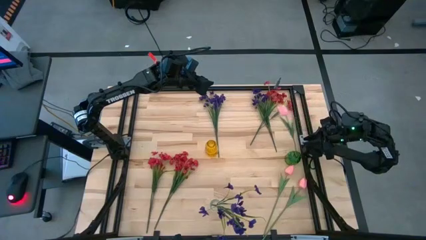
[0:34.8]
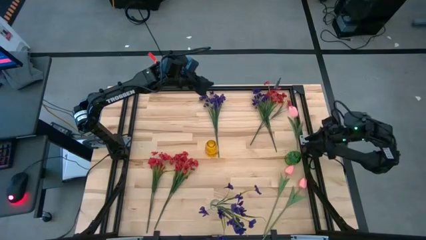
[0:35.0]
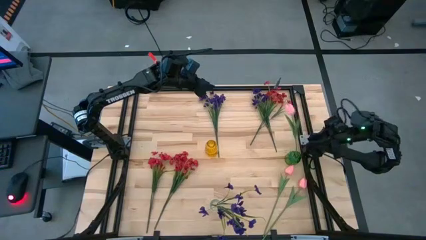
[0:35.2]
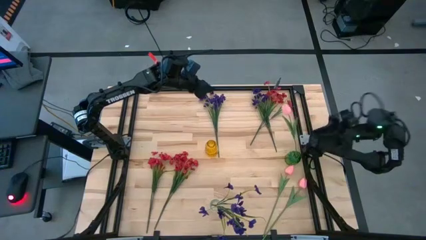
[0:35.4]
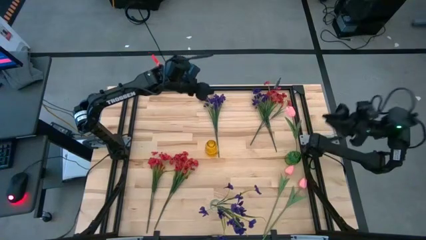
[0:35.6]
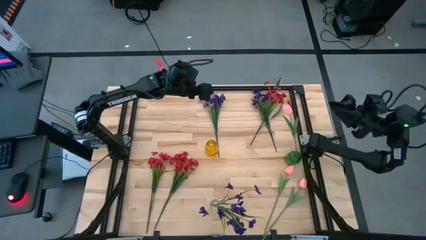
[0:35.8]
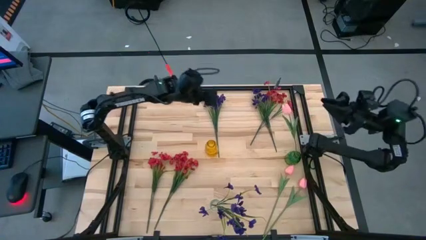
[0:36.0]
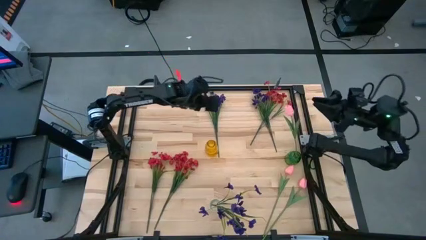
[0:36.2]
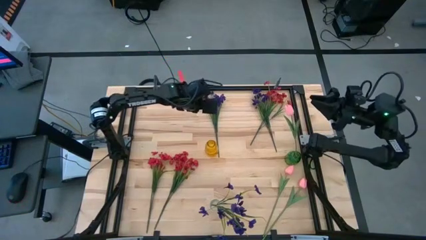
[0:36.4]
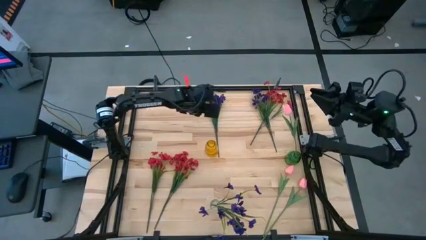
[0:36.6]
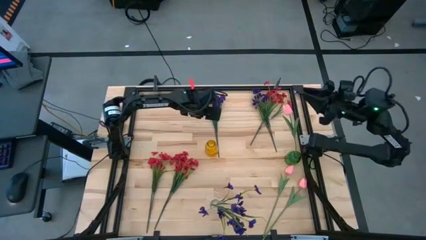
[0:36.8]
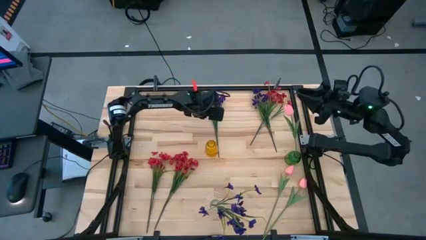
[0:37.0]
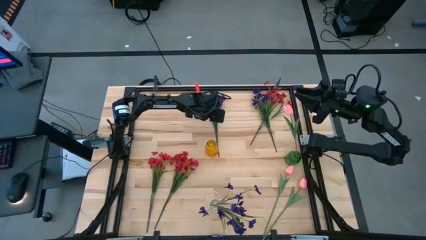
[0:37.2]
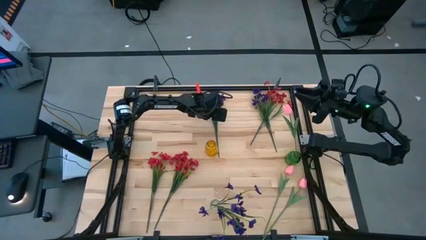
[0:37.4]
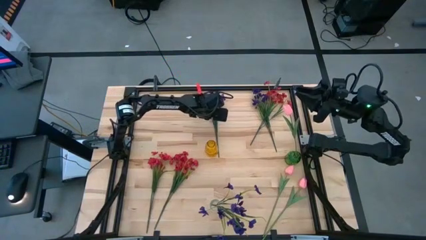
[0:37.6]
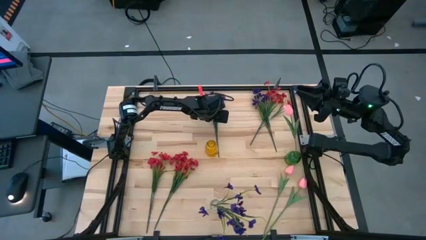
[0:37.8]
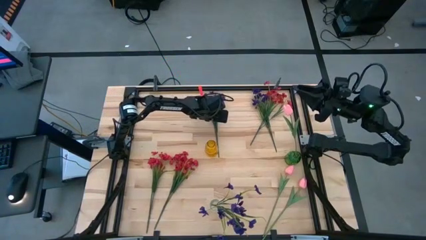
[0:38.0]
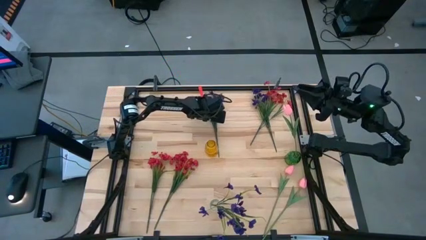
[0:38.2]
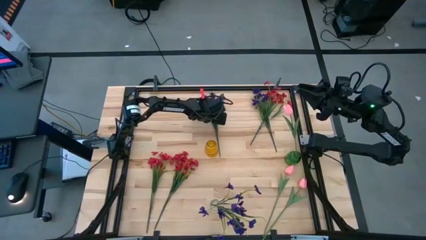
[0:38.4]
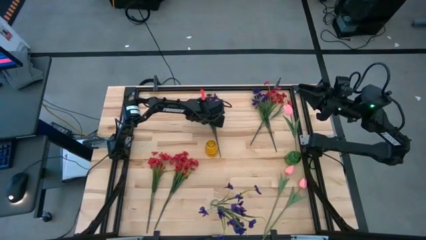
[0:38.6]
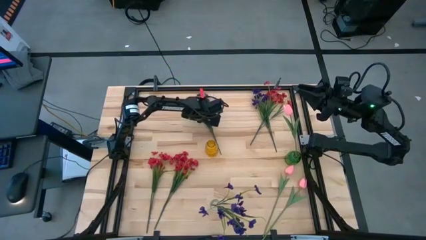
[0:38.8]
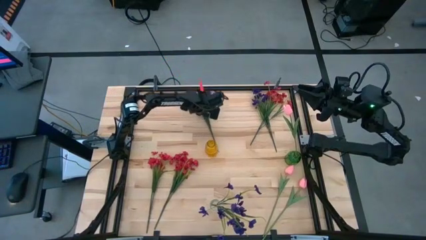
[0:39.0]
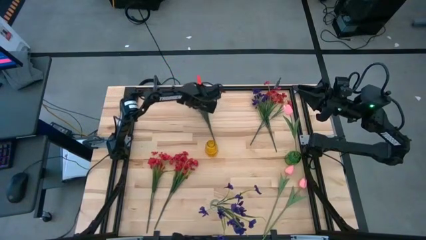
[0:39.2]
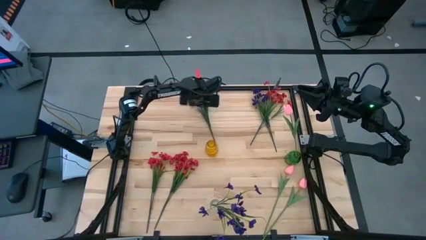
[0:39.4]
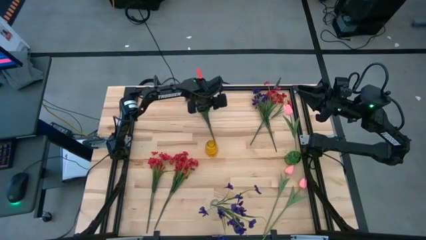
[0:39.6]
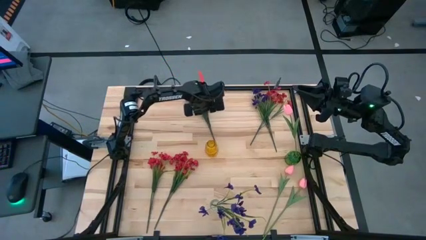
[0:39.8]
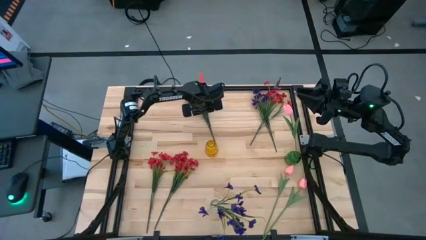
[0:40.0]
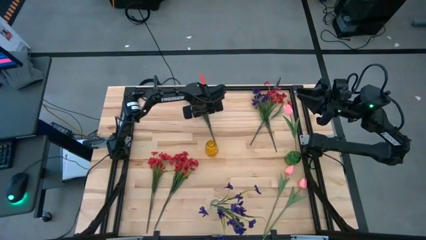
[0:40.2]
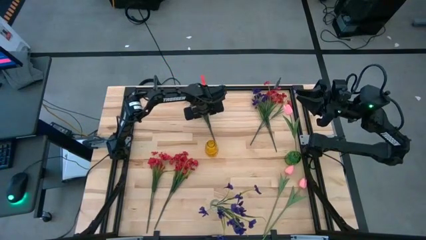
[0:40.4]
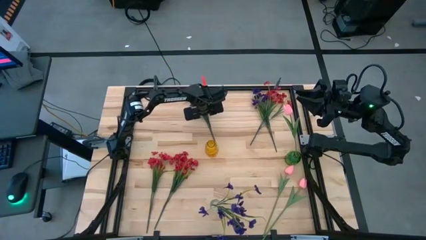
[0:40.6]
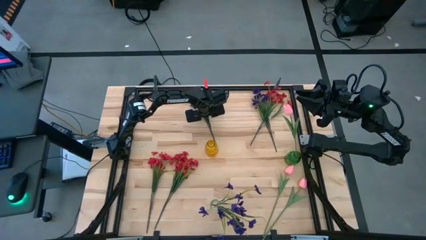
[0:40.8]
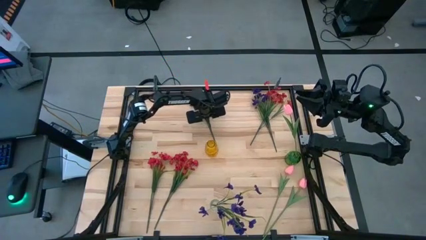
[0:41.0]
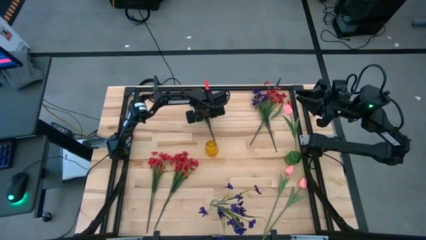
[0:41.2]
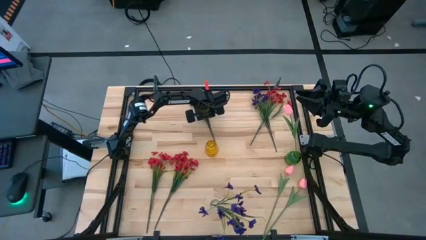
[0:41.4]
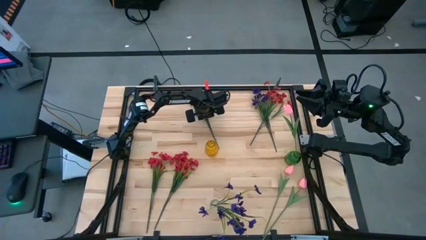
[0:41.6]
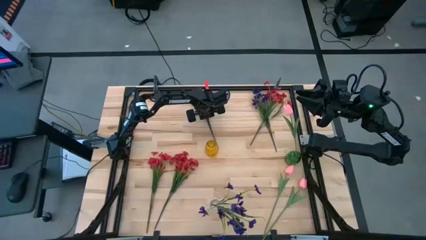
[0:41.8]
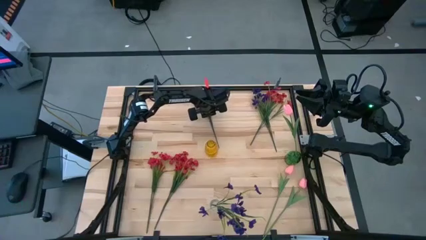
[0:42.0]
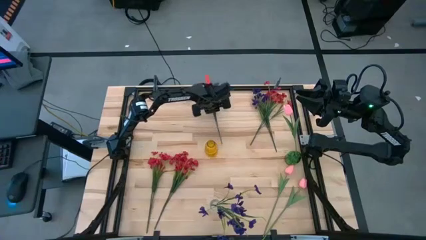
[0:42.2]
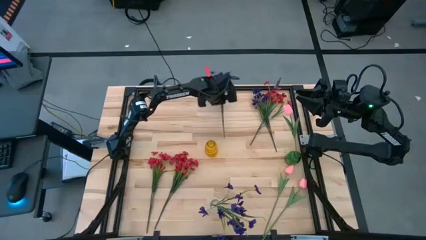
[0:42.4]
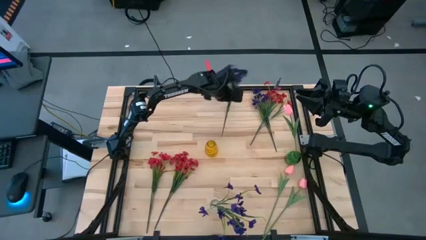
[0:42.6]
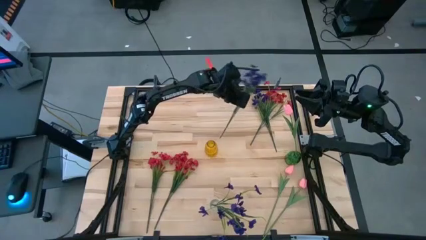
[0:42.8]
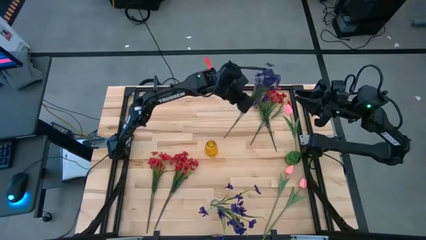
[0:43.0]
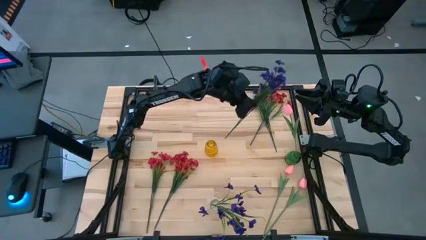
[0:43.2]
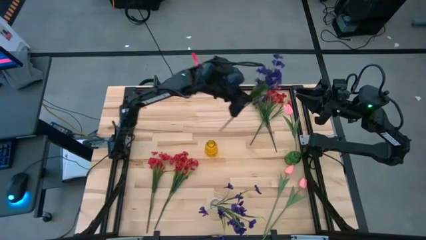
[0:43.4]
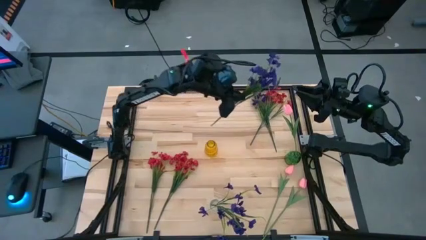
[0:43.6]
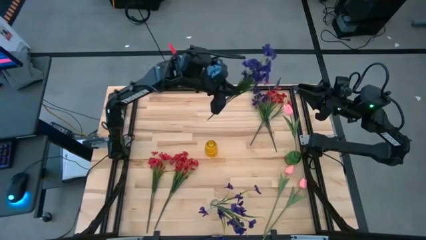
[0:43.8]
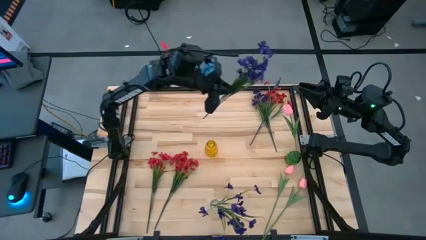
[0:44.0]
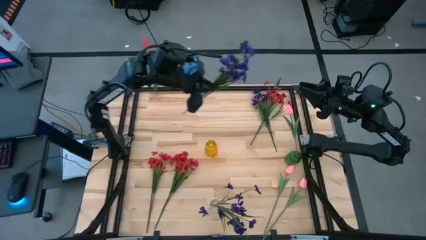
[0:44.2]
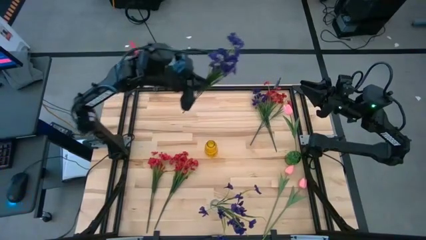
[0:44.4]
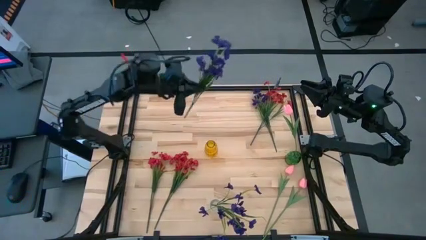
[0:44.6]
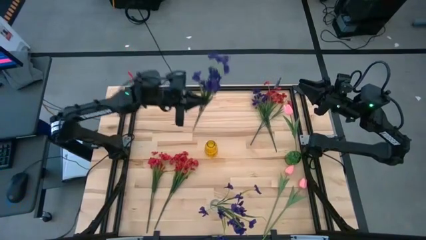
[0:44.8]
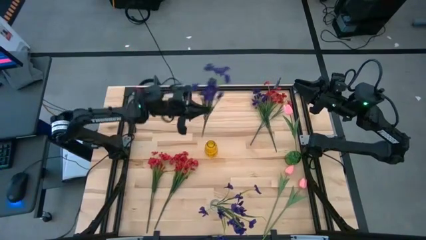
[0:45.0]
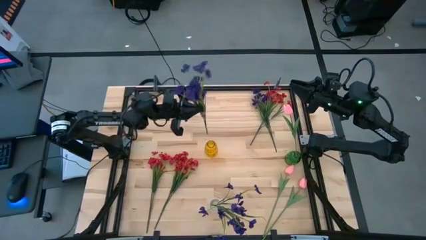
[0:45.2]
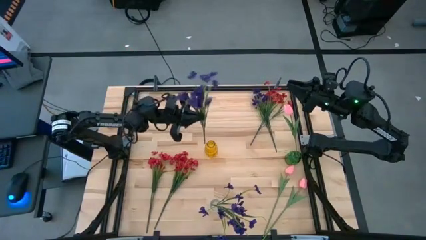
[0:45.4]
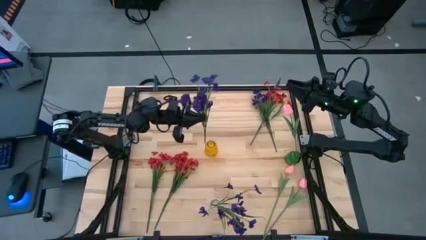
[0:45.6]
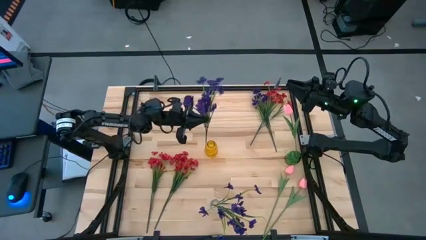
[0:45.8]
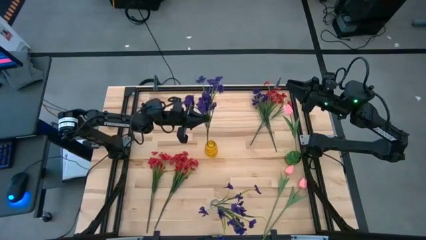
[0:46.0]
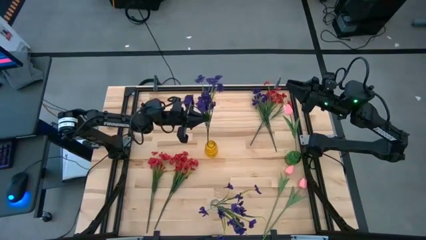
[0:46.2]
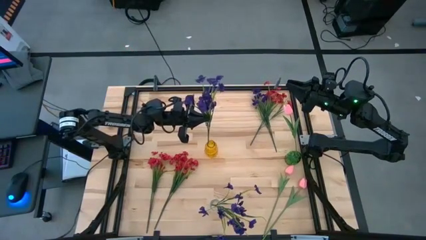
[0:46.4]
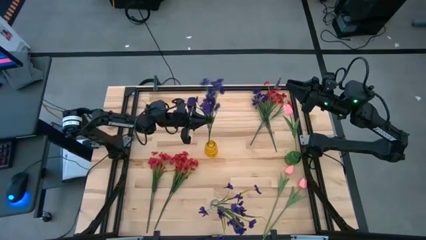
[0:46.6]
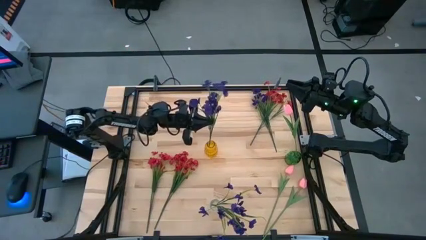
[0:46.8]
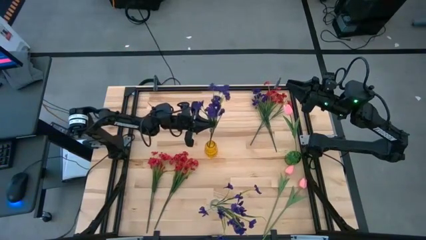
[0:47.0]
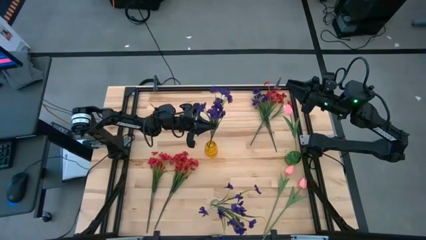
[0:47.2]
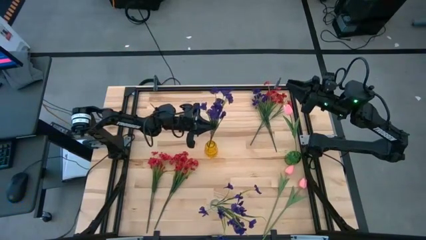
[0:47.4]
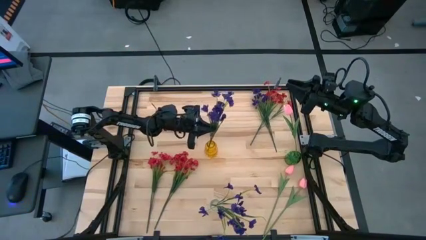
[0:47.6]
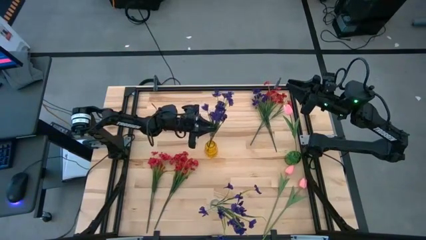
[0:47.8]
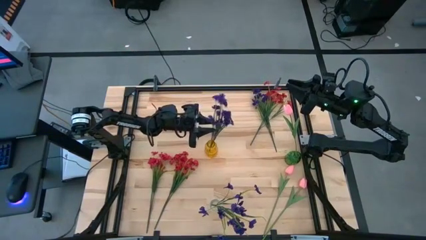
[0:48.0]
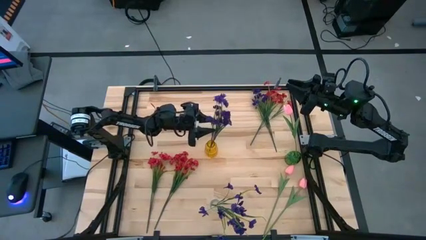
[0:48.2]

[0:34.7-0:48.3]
Task: Sort flowers into vase by color
Put the left purple flower into the yellow vase
